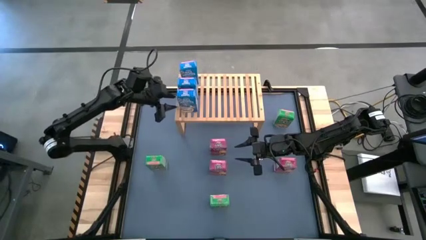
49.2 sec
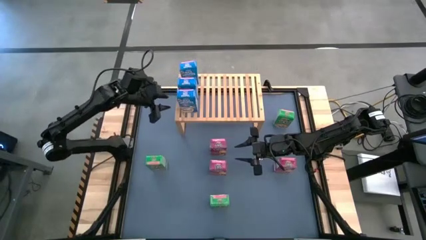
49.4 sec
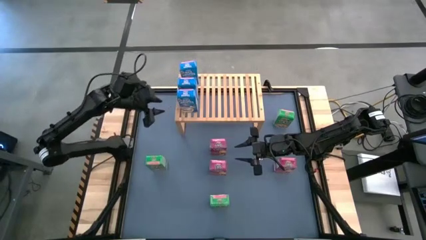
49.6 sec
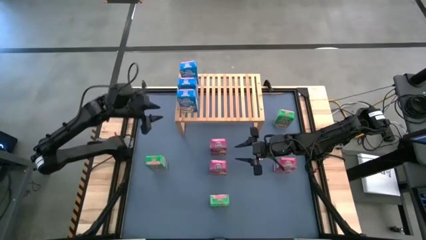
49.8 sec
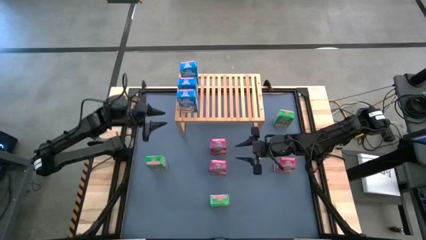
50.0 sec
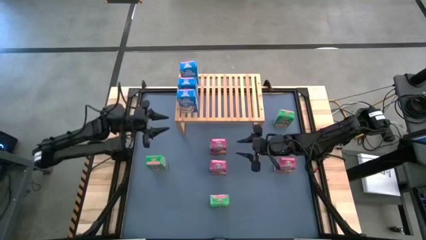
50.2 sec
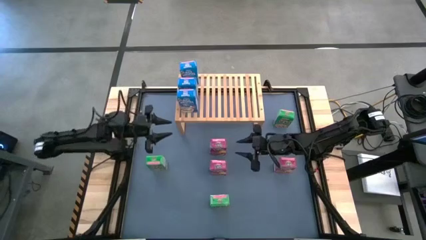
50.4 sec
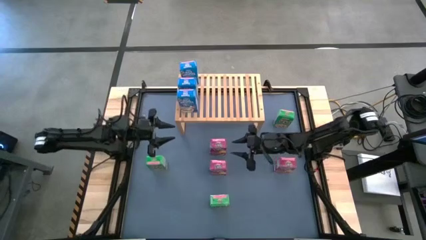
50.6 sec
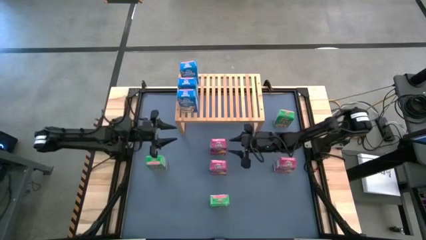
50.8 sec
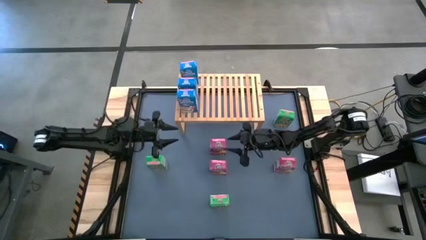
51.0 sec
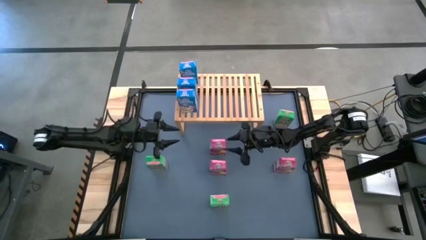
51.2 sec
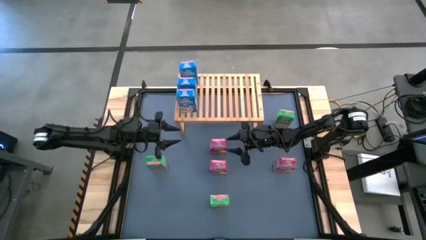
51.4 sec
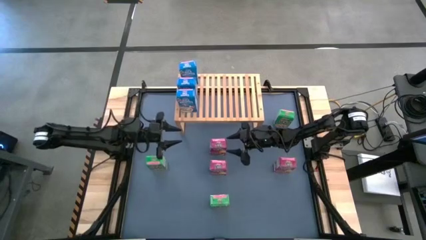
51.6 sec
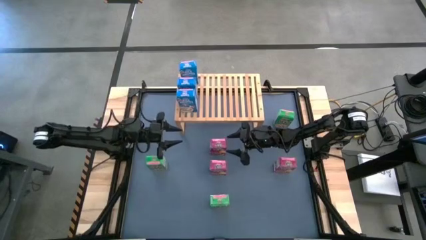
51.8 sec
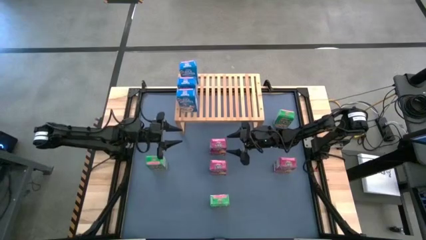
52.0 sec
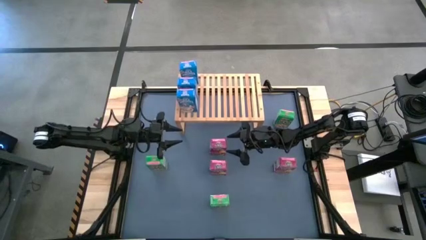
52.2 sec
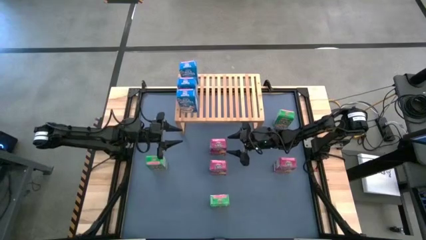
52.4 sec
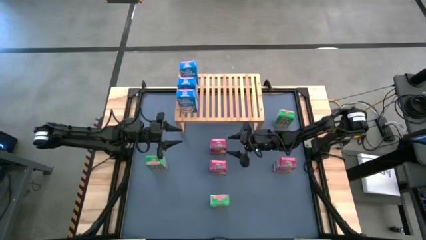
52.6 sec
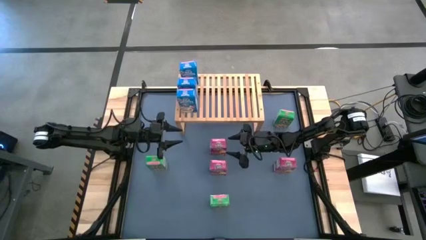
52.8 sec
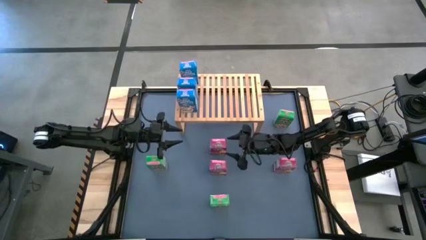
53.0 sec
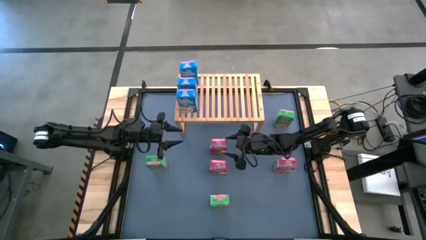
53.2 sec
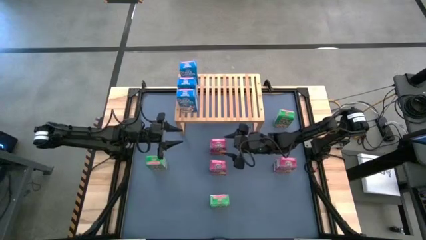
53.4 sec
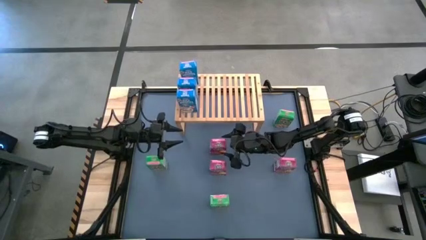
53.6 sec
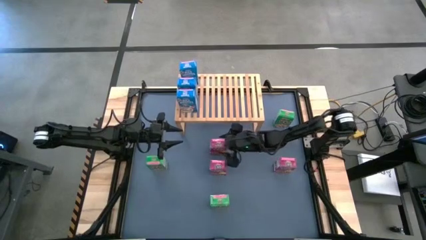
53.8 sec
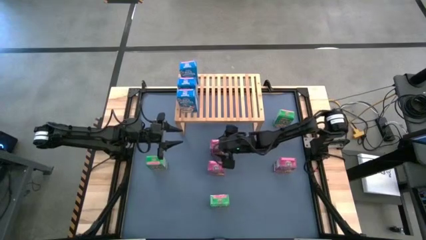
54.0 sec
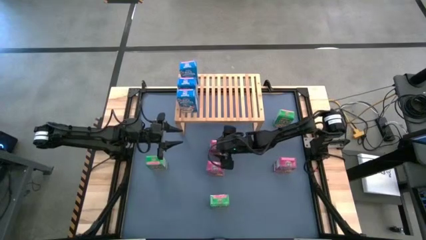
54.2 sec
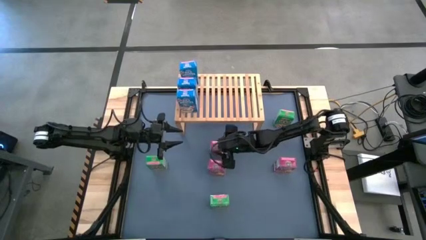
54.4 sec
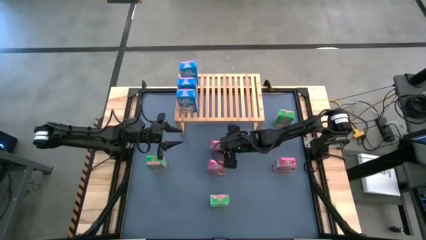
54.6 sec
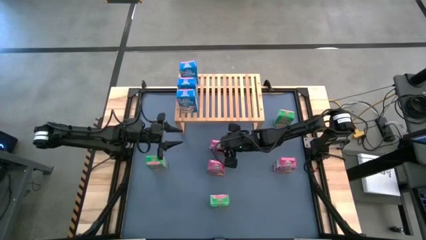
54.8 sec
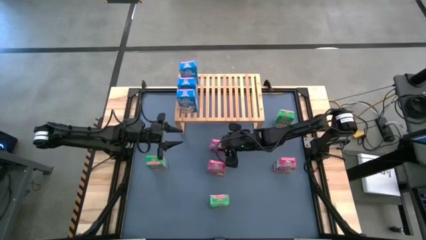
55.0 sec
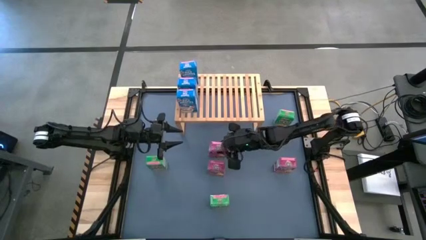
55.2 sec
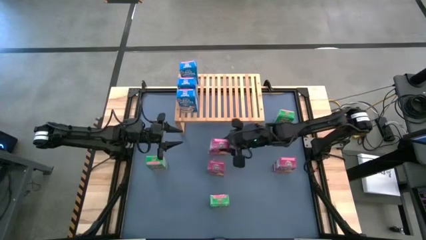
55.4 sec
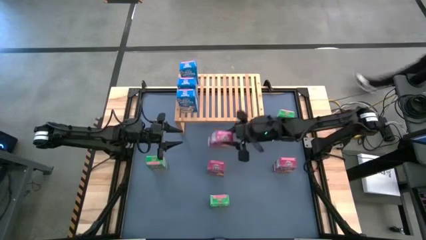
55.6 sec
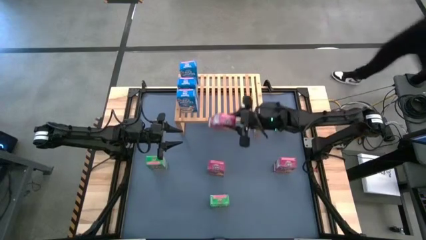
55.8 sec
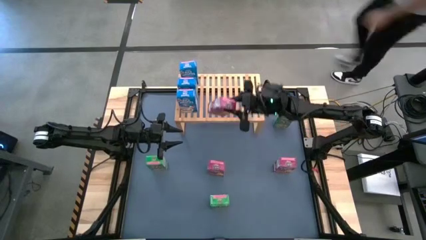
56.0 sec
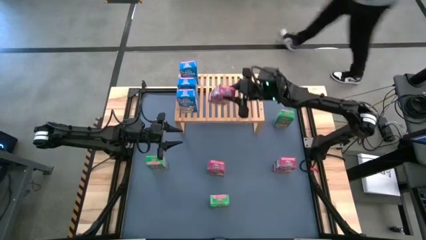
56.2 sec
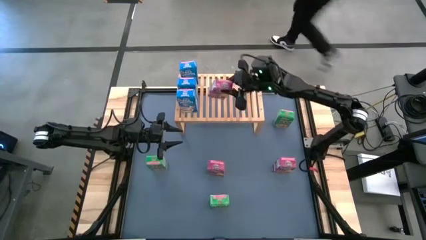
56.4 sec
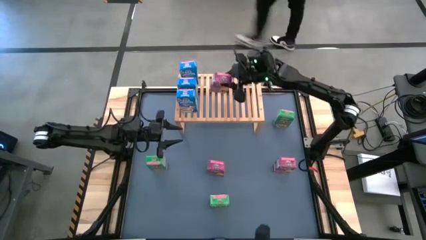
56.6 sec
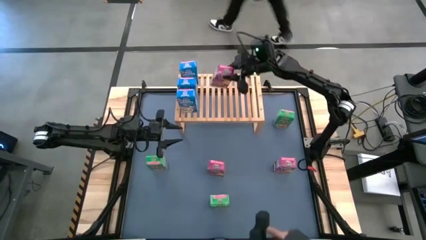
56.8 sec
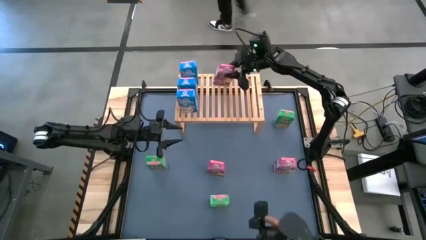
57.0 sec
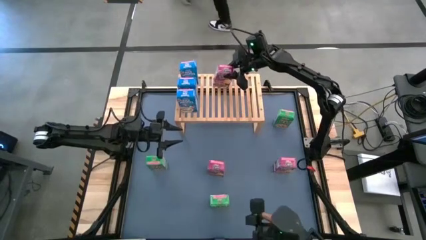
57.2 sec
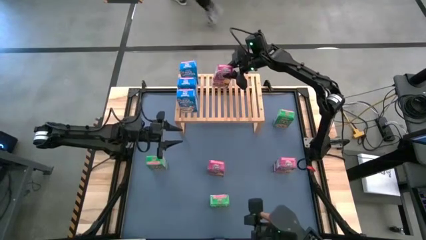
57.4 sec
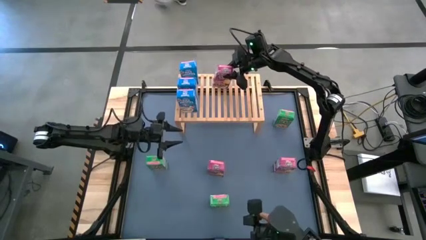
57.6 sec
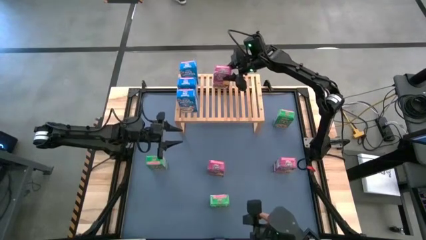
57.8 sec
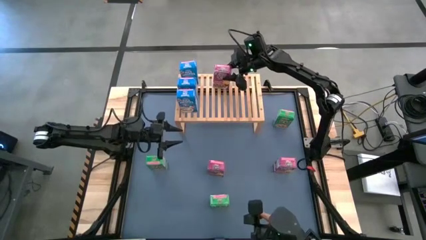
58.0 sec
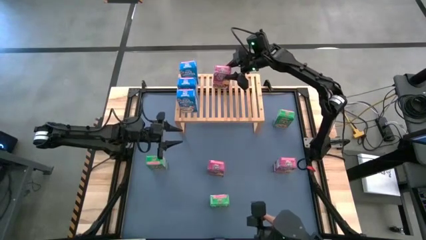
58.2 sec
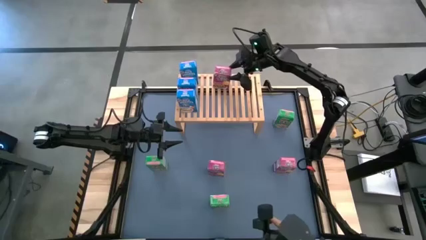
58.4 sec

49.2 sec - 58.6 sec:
Task: Stack cereal on shelf
Put the top pink cereal box on the shelf

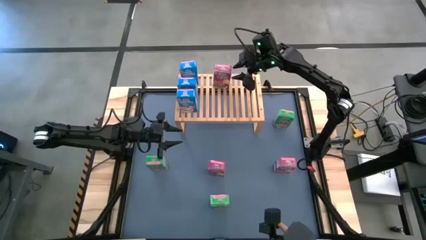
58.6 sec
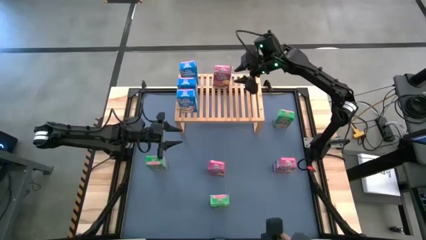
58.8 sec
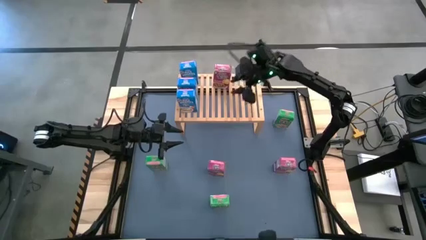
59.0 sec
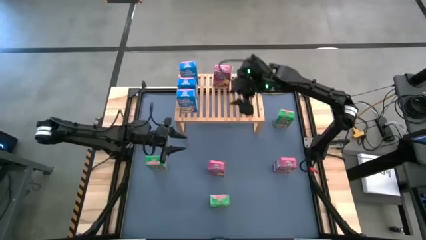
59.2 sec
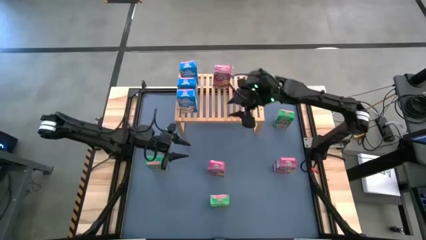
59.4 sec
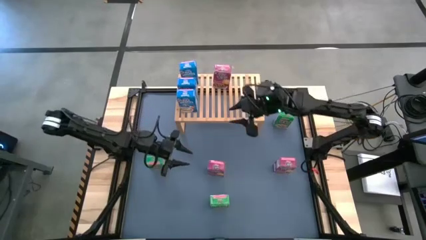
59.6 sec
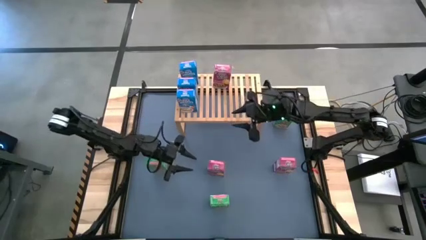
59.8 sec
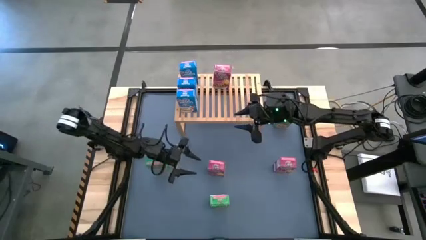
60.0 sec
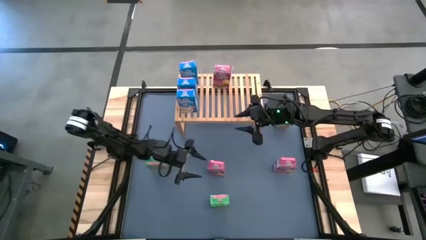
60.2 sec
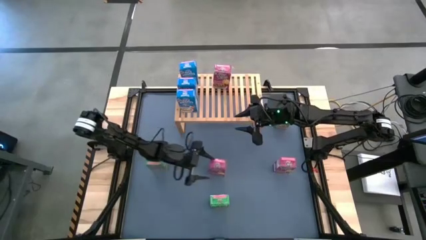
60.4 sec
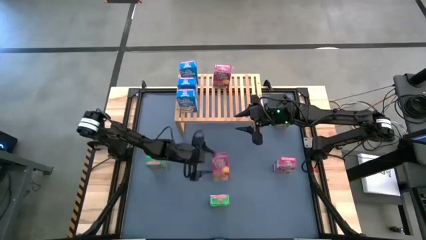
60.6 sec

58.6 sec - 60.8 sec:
Put the left pink cereal box on the shelf aligned with the other pink cereal box

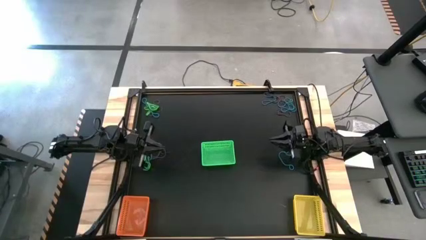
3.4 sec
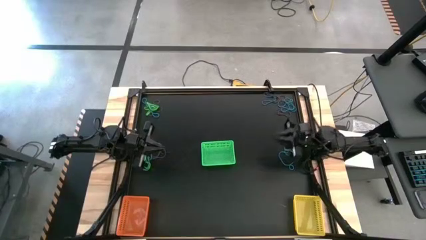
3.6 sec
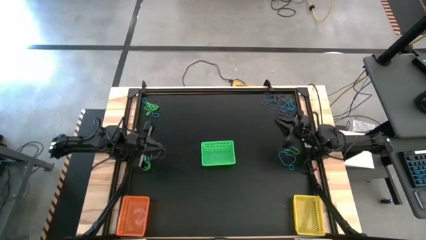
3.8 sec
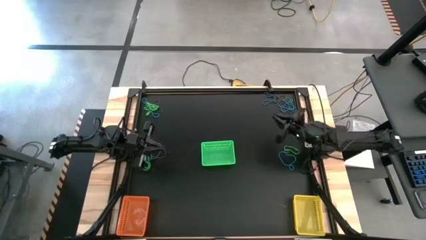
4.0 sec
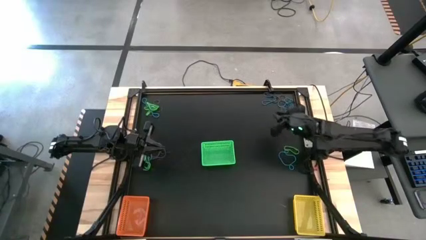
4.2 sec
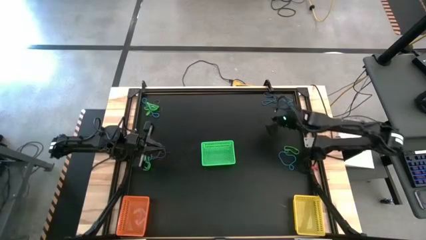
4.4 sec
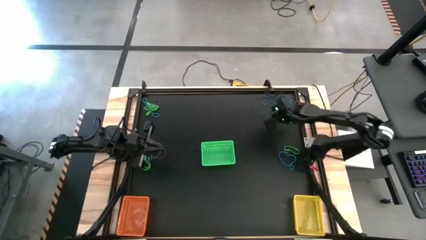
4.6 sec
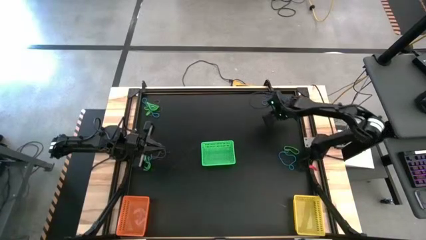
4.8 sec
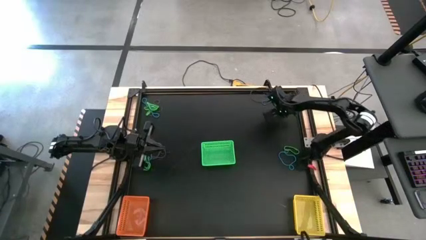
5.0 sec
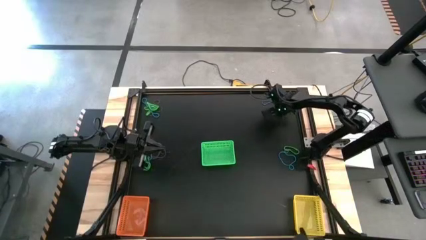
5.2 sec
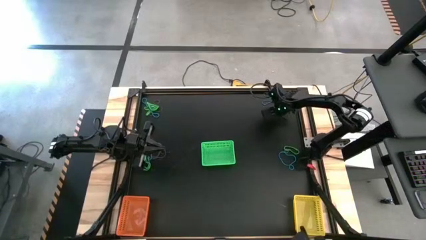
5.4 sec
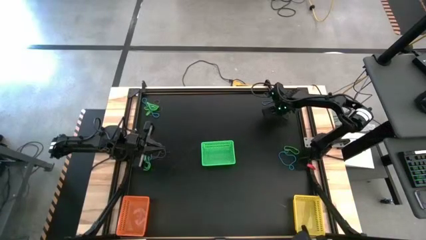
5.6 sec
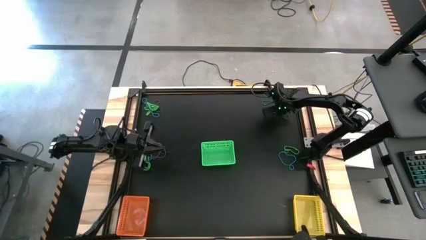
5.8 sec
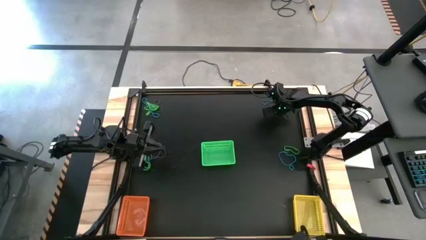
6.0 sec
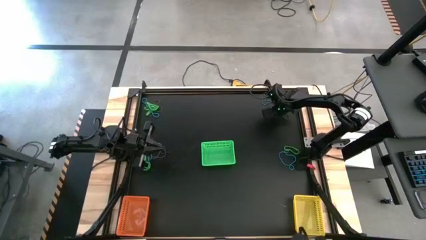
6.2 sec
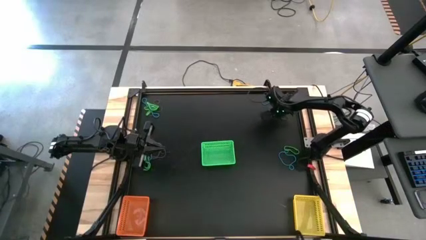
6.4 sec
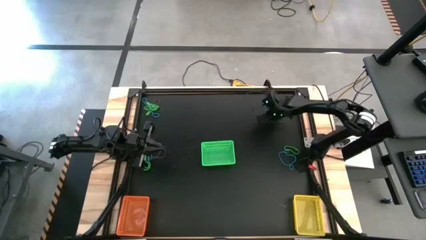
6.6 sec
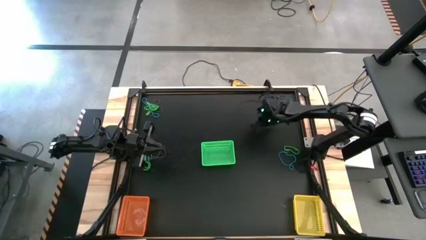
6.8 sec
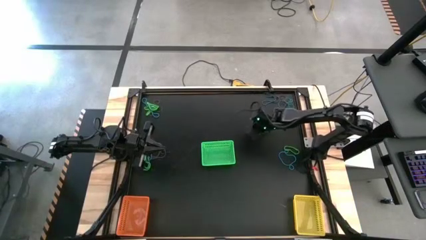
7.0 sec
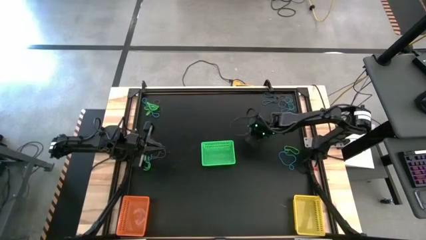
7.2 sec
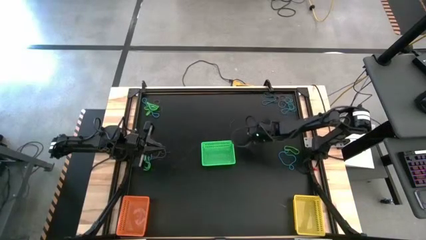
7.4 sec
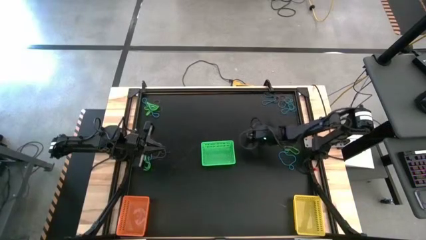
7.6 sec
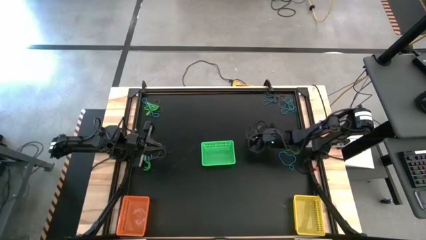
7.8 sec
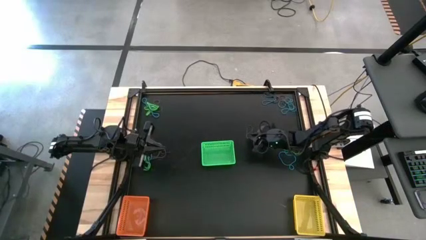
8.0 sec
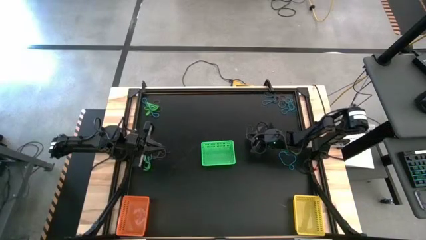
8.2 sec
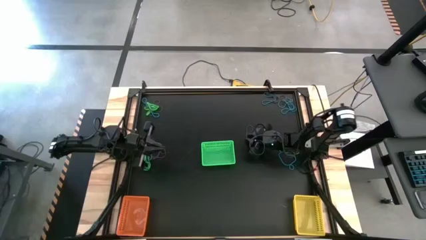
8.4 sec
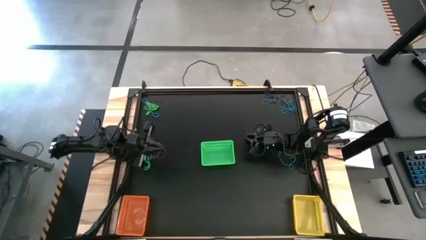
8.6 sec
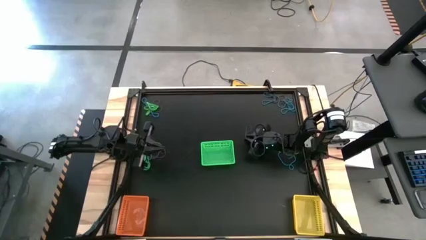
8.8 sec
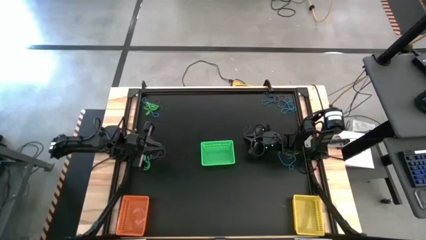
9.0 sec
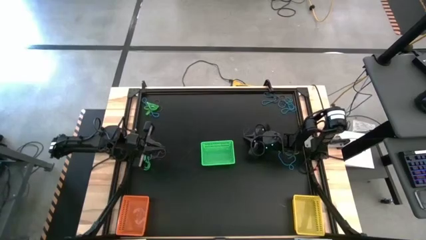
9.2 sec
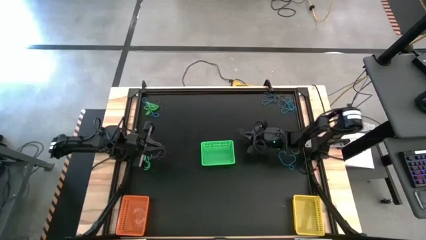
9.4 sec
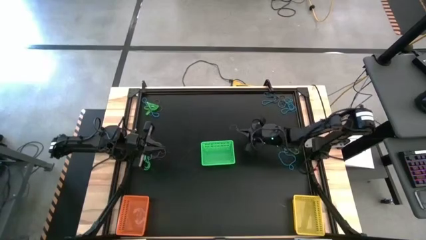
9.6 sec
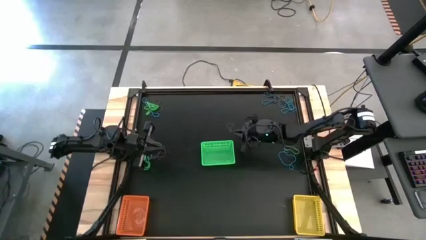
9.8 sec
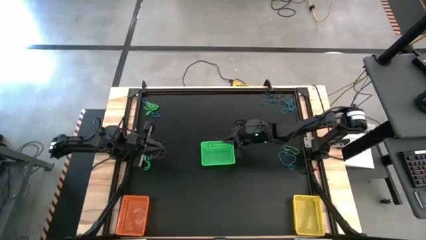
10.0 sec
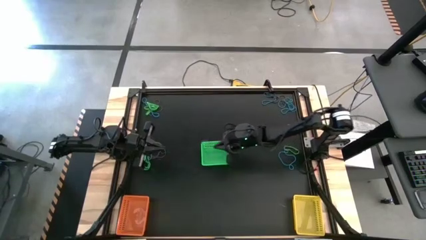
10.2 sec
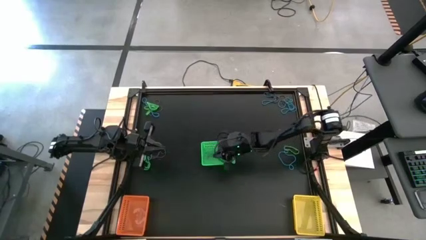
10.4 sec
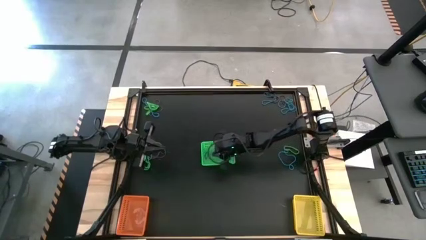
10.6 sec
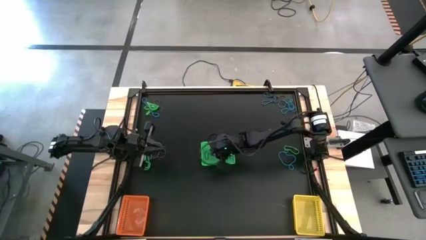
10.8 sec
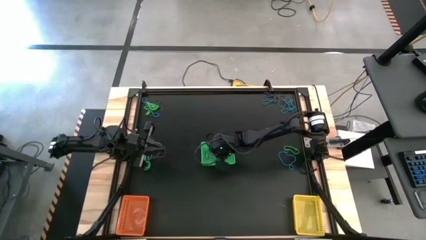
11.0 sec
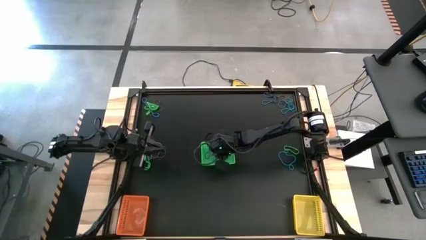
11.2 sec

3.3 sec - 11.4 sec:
Task: Sort rubber bands into baskets
Put the violet rubber band into the green basket
